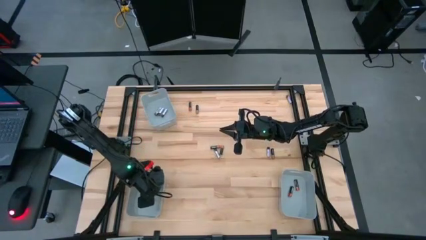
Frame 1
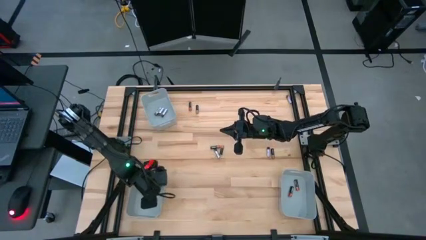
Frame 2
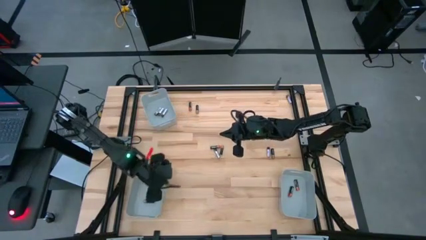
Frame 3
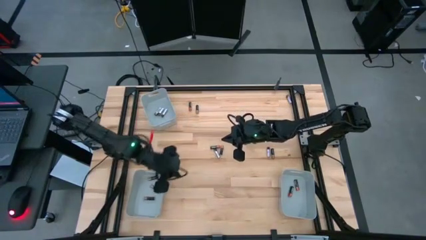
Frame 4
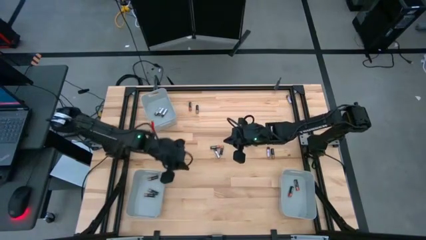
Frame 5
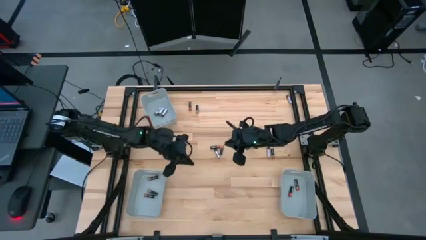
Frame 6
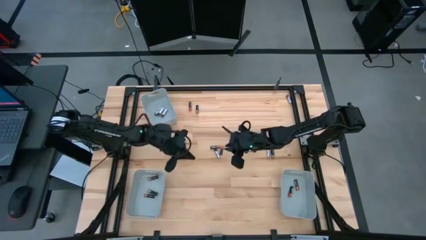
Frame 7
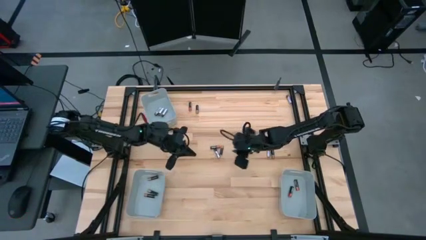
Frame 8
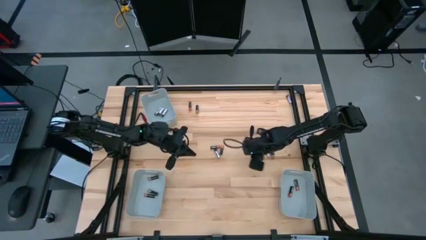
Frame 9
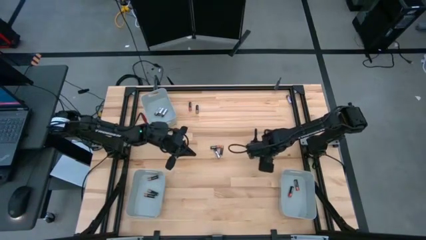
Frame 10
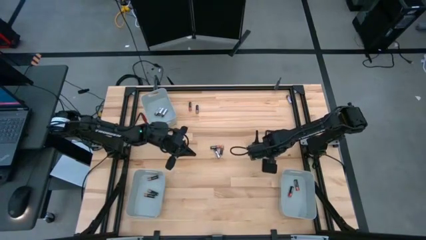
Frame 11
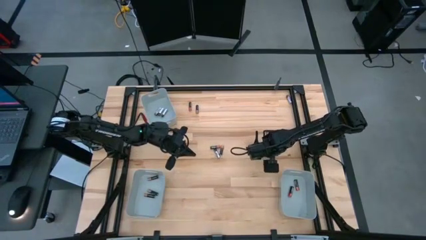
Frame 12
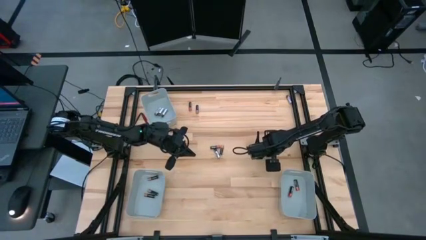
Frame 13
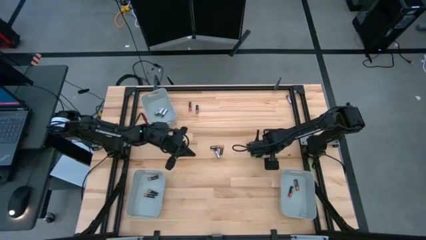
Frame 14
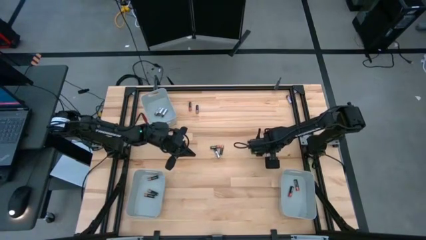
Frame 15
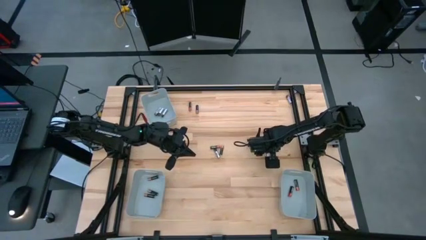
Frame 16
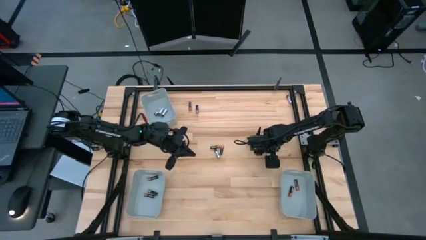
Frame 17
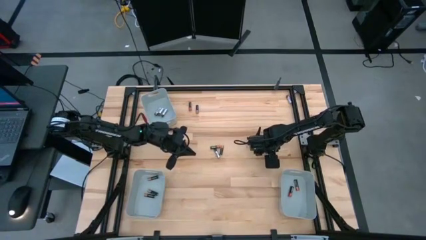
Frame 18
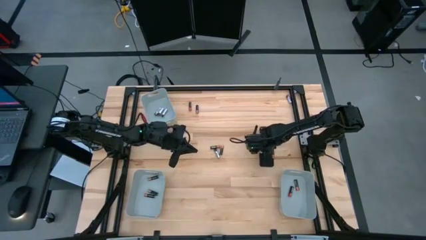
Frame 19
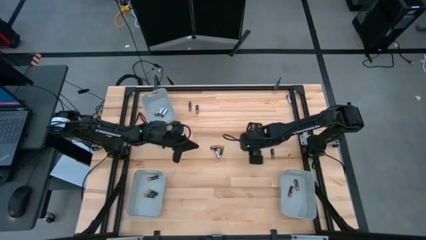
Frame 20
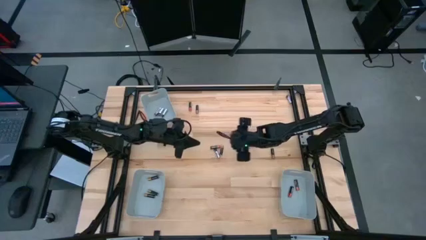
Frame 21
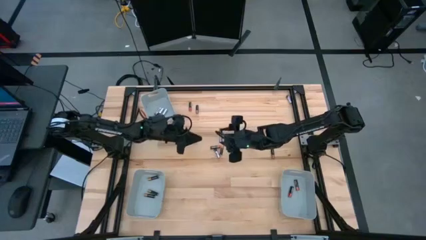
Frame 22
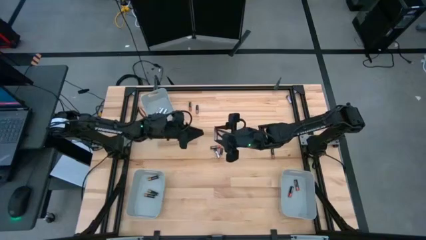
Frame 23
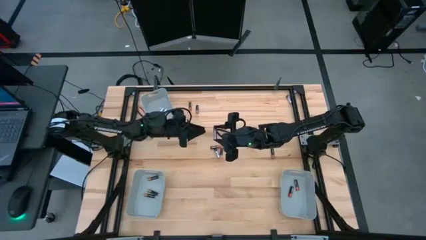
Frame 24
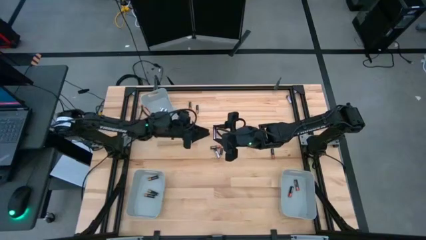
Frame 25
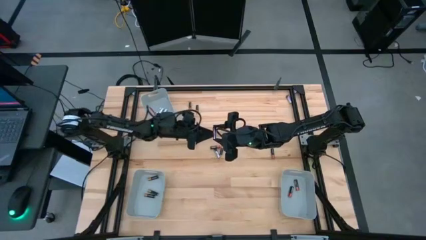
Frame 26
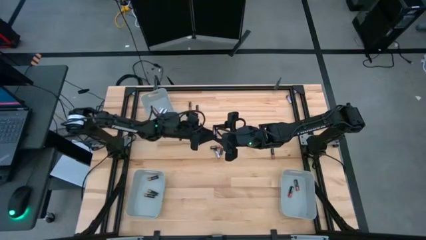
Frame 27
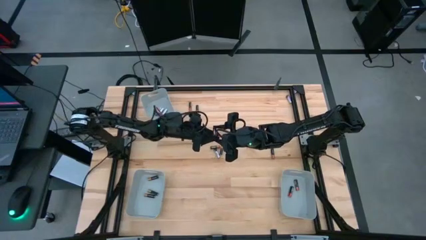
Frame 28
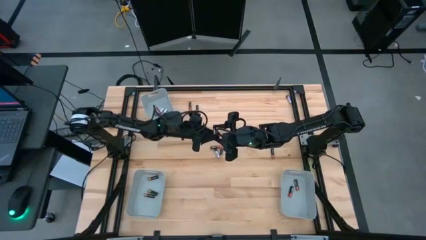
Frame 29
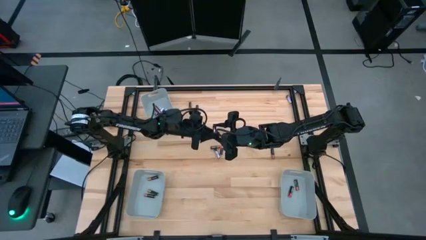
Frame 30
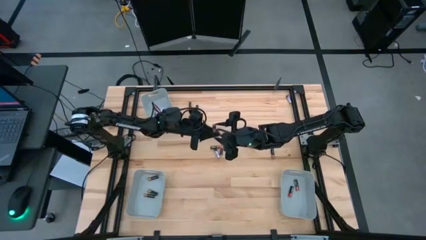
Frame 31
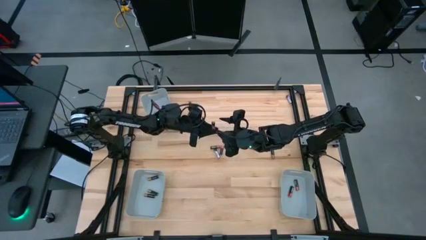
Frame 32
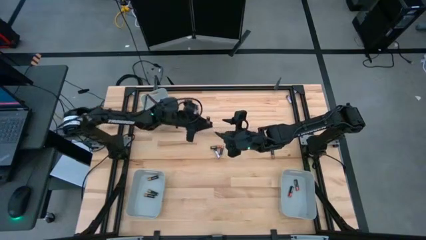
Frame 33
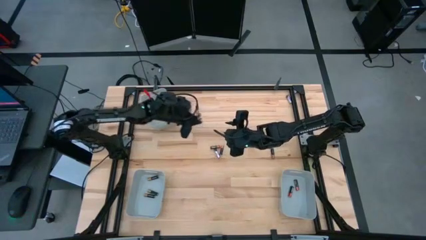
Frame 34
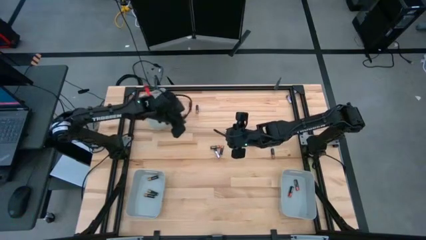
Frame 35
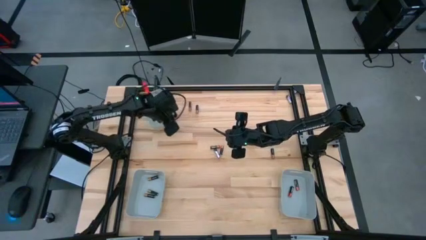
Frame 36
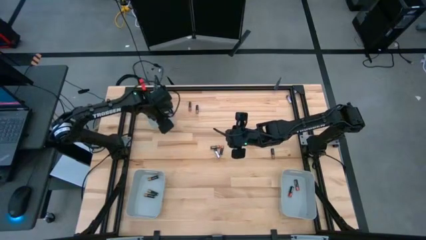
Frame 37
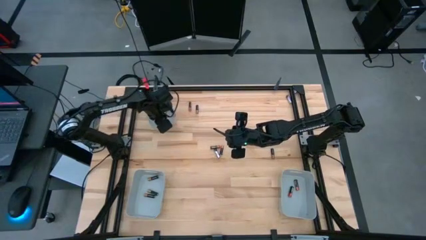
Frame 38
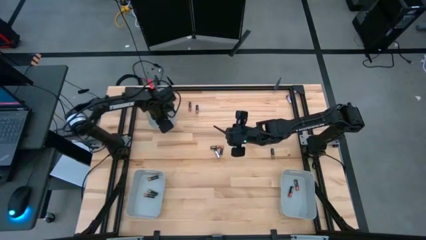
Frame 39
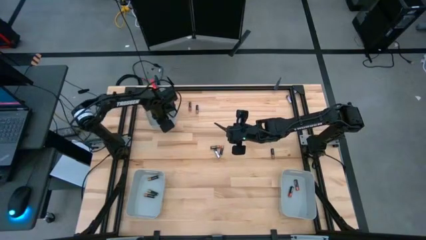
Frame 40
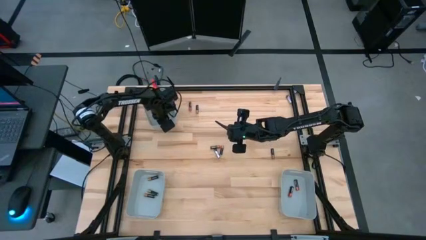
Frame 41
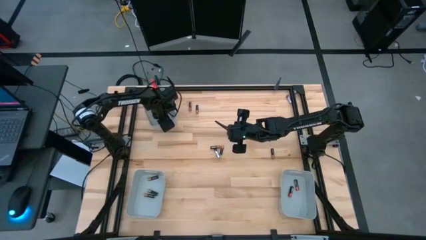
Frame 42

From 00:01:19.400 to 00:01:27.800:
Task: Sort batteries
Put the silver battery into the top left gray bin

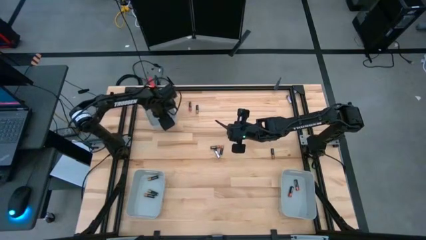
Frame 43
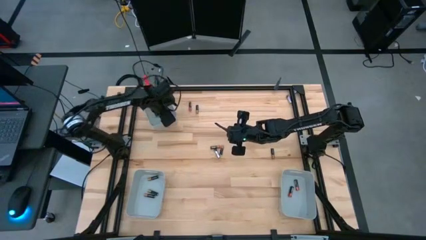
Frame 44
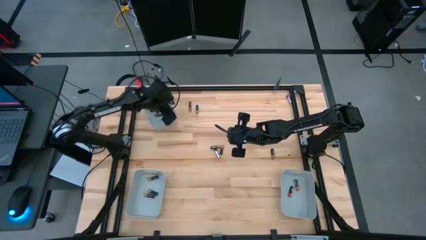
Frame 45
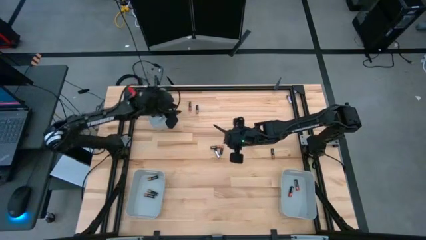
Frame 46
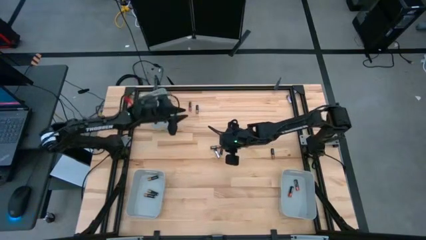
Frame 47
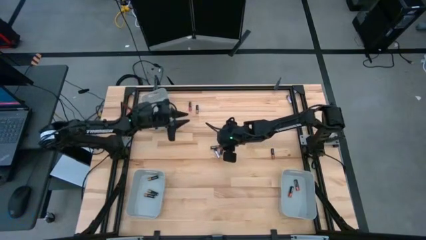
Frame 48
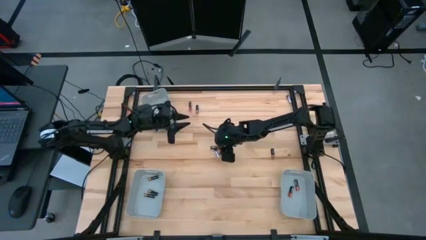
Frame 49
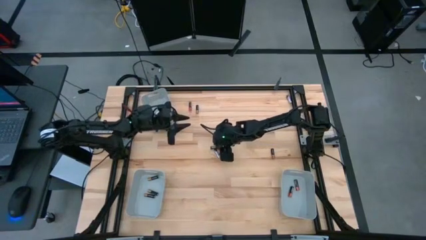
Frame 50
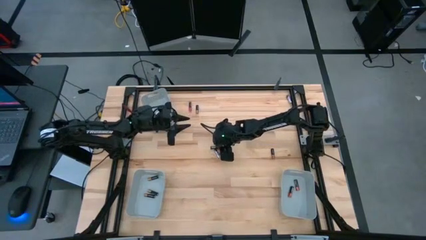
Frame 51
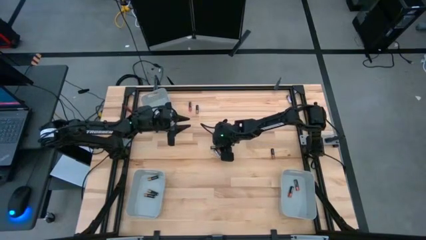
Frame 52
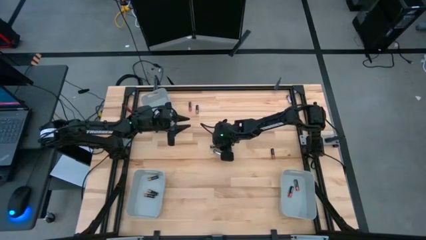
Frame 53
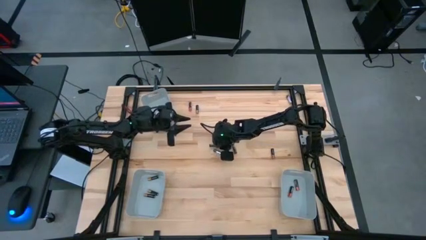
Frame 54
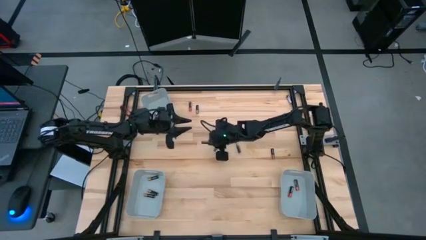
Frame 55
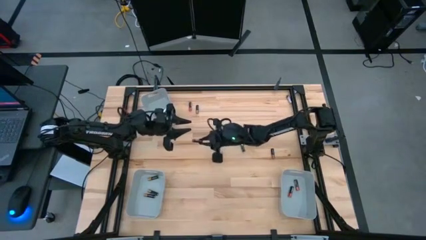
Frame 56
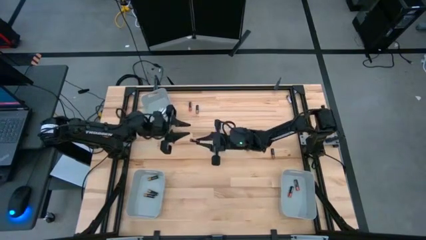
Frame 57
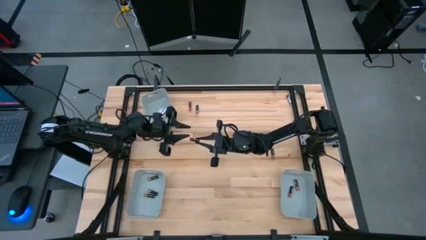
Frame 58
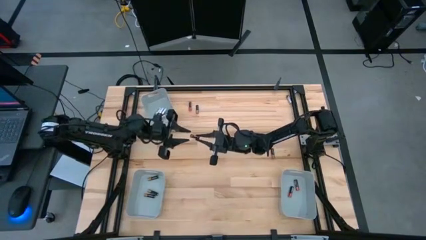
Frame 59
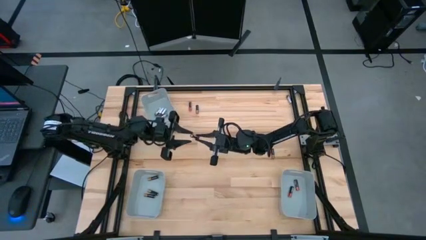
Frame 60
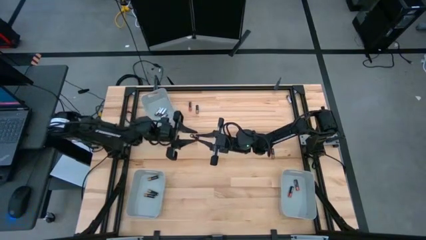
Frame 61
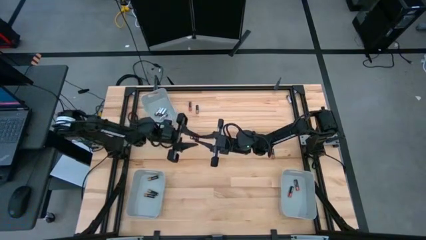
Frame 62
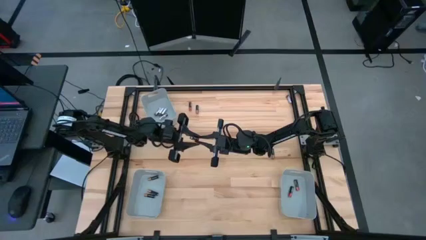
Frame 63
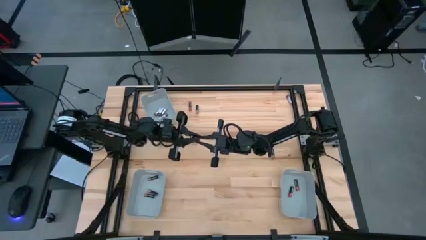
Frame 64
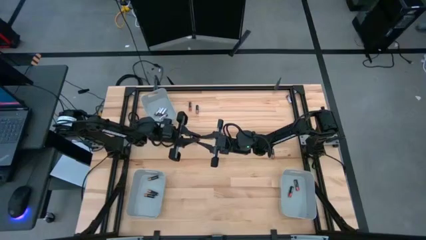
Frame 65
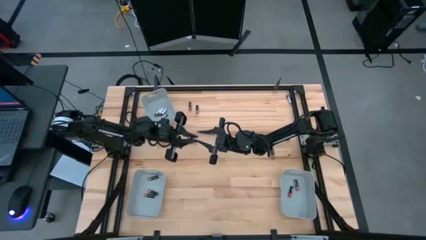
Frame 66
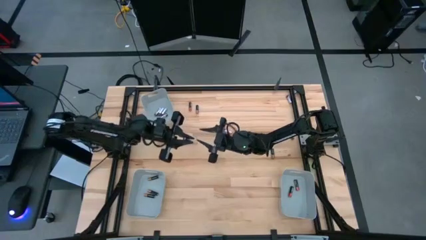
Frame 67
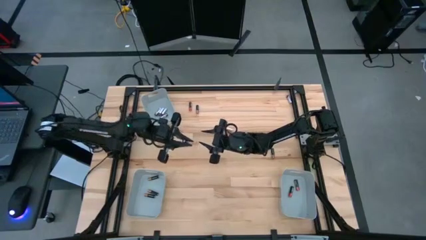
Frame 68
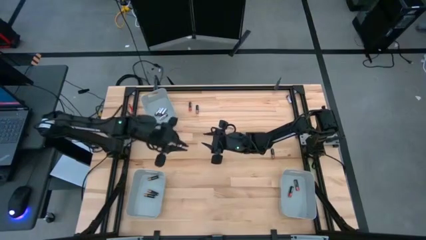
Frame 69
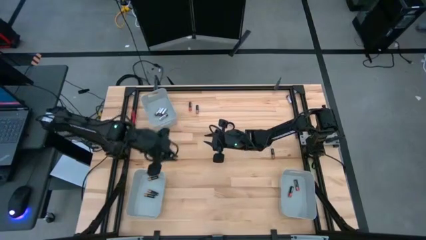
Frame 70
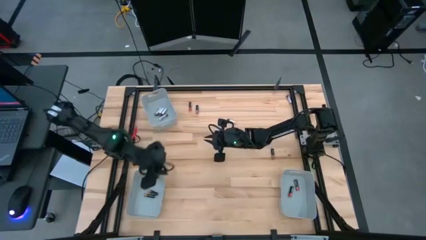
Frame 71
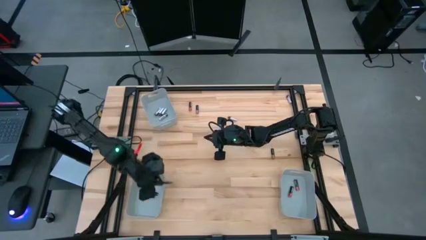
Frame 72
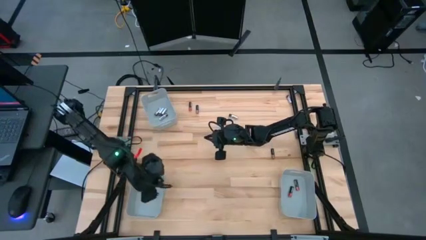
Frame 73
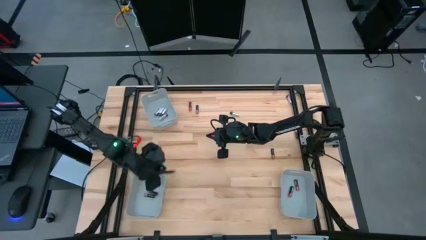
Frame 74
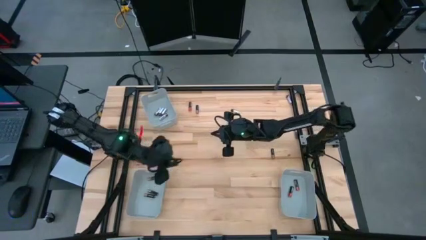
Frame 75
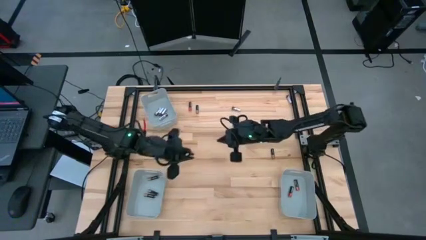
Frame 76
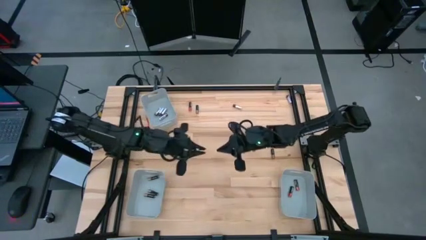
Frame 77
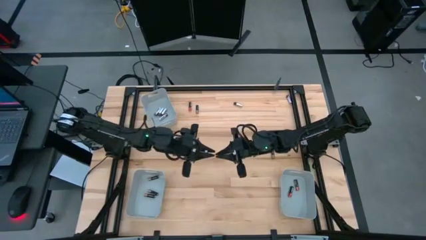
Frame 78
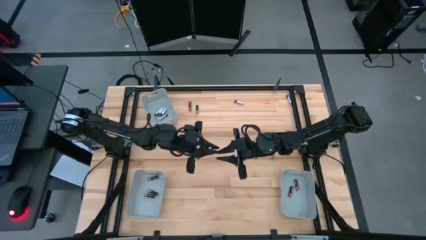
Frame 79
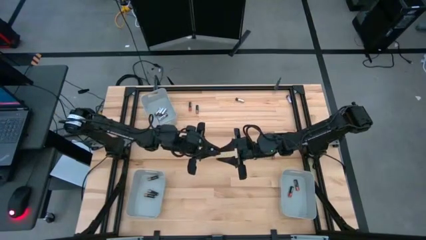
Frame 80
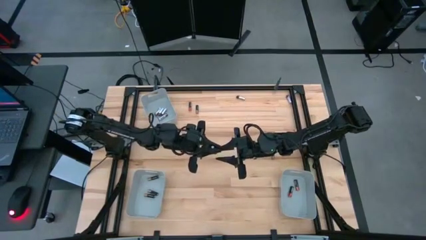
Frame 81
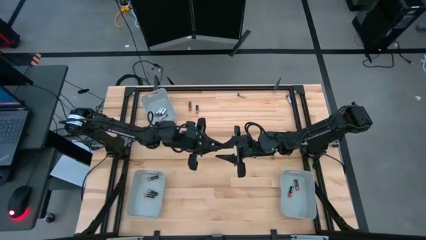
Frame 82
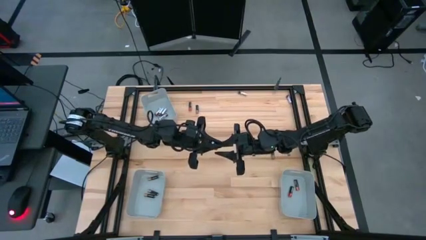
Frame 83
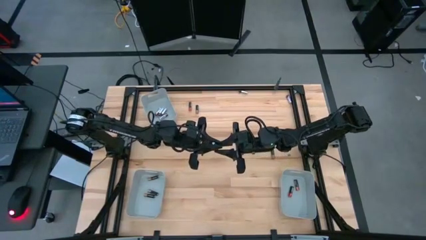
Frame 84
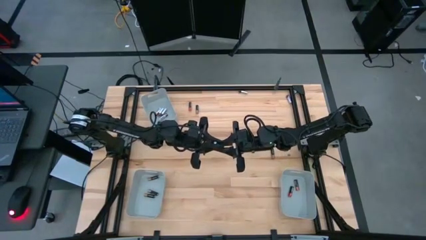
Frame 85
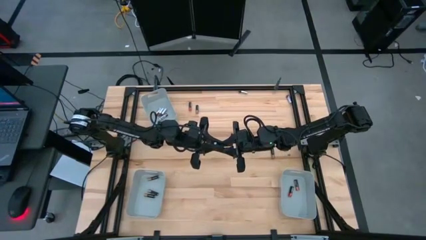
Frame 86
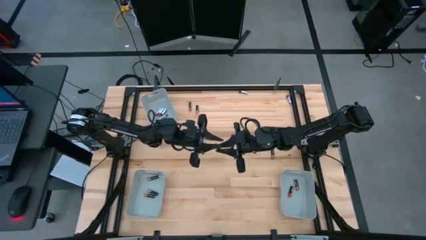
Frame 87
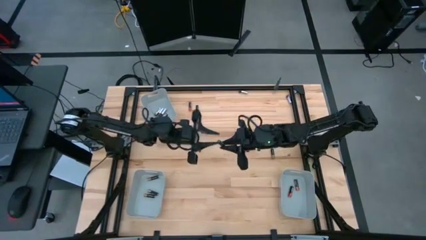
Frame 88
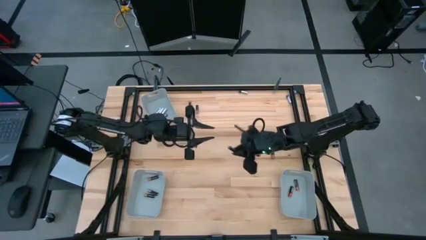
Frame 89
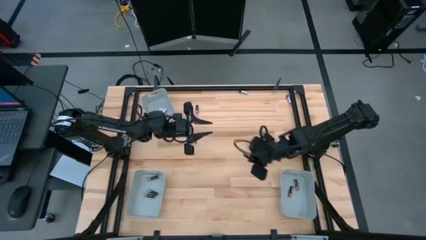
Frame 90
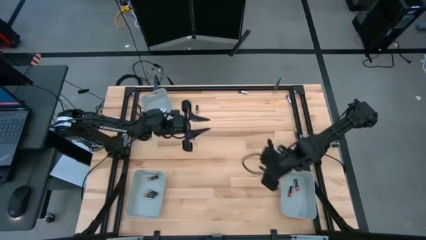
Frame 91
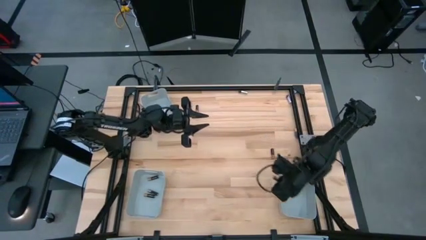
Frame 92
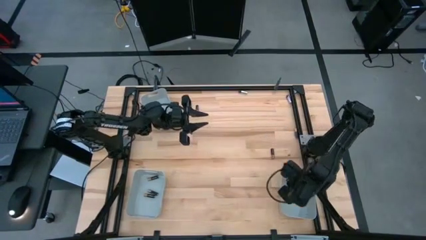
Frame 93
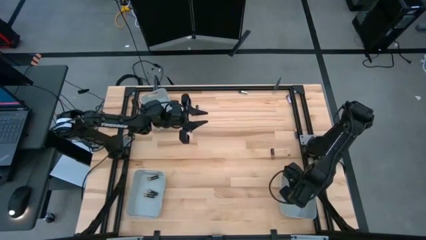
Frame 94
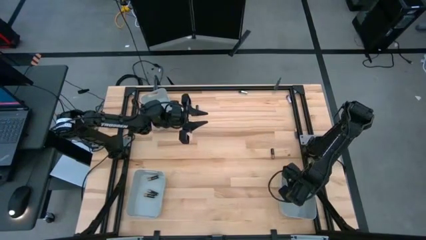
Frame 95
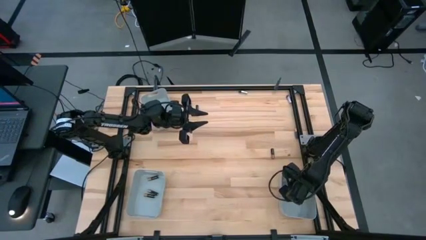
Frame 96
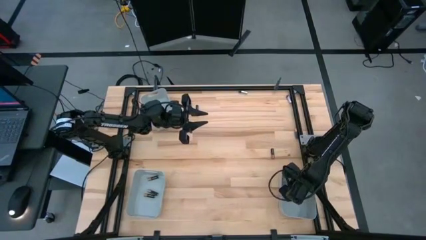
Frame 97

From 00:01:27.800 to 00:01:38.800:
Put the black-red battery into the bottom right gray bin
